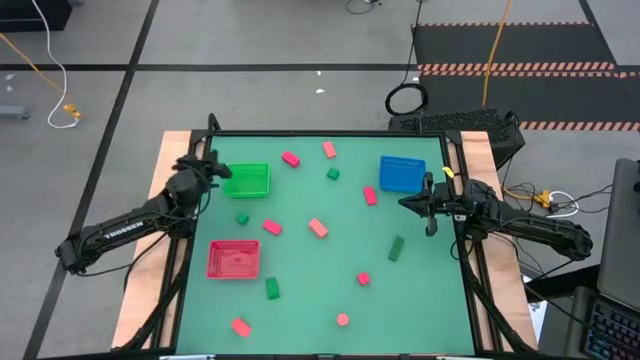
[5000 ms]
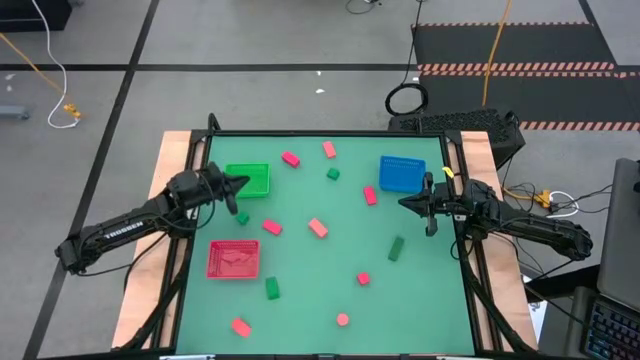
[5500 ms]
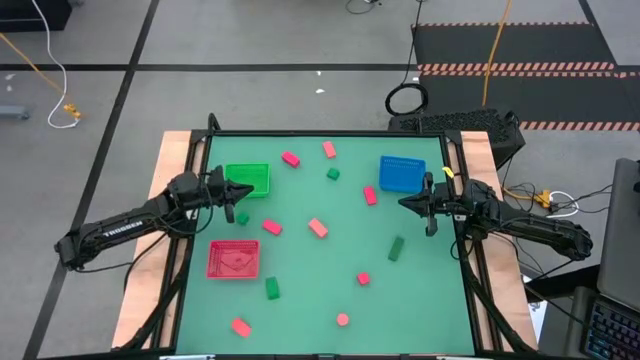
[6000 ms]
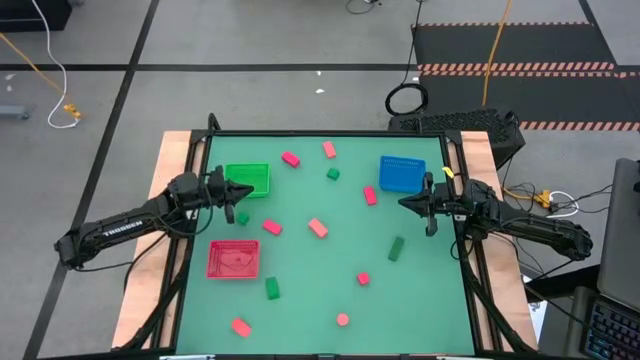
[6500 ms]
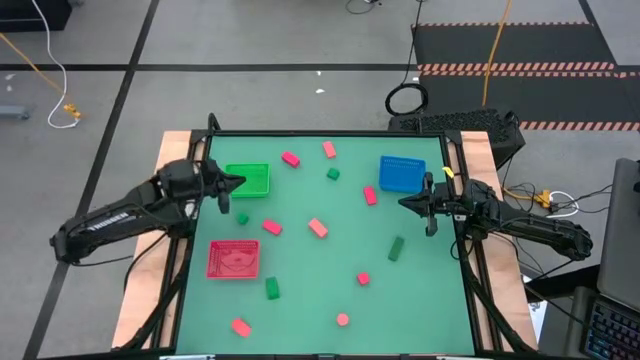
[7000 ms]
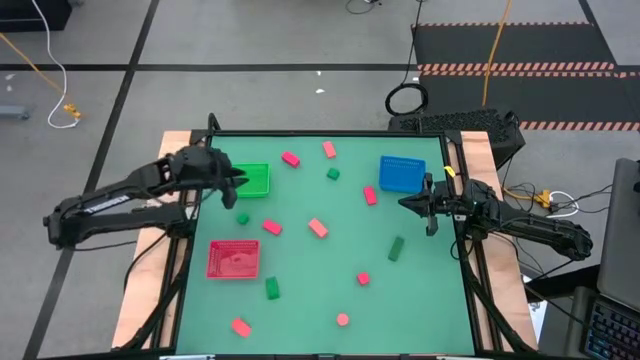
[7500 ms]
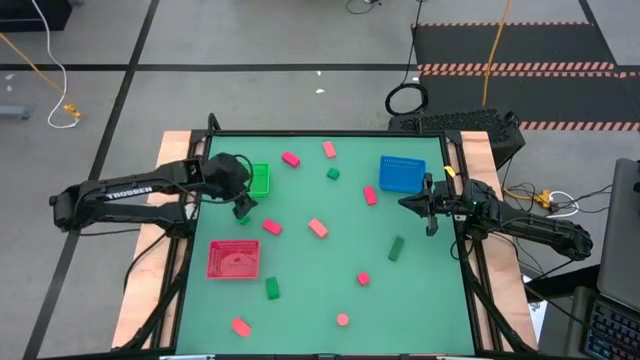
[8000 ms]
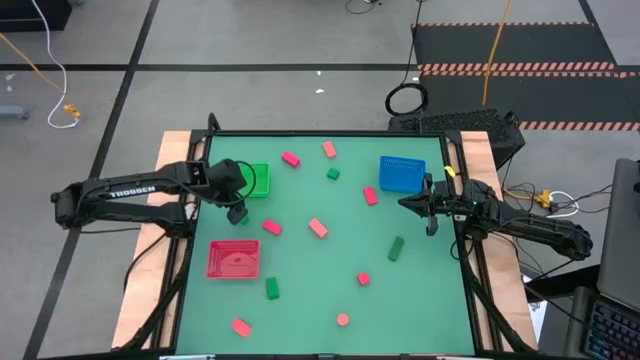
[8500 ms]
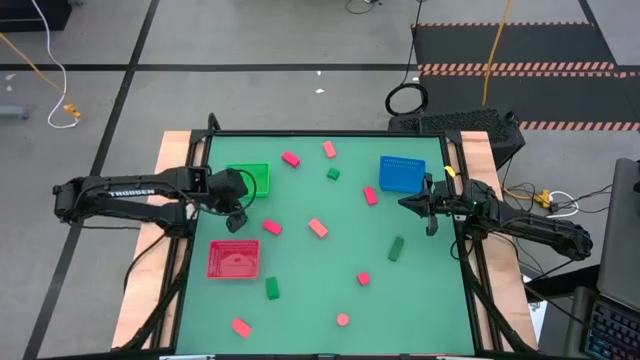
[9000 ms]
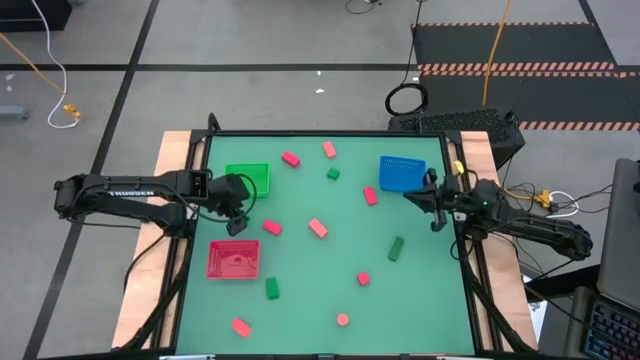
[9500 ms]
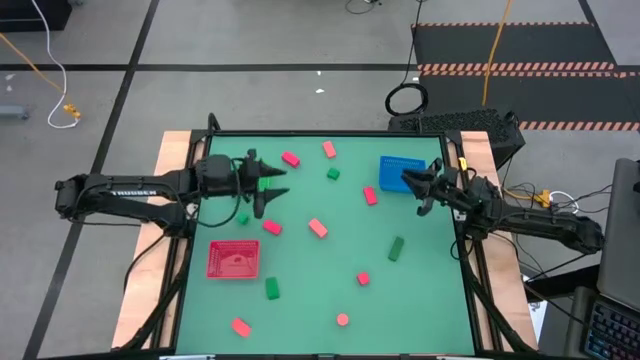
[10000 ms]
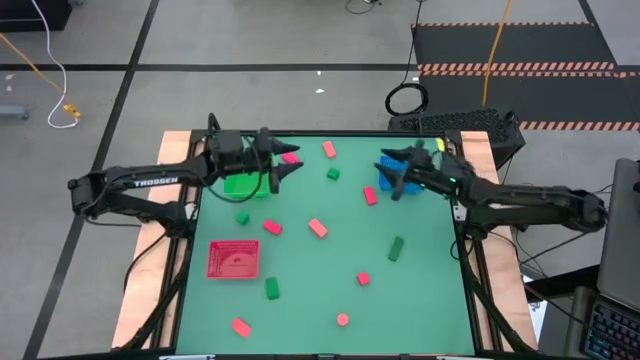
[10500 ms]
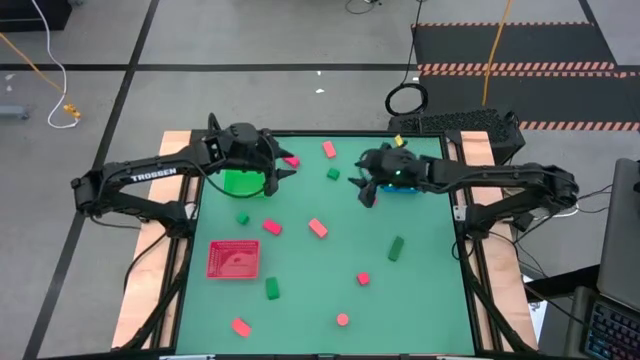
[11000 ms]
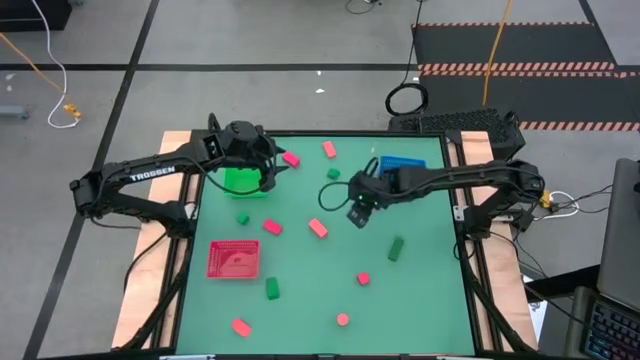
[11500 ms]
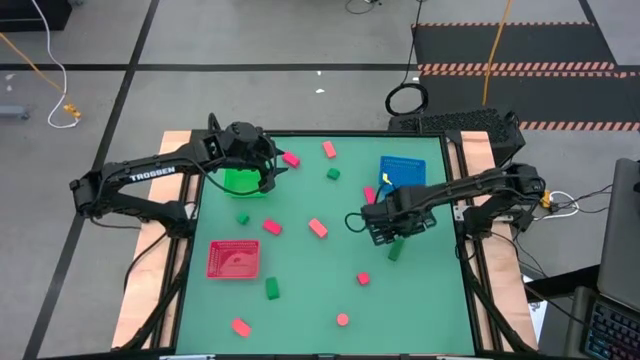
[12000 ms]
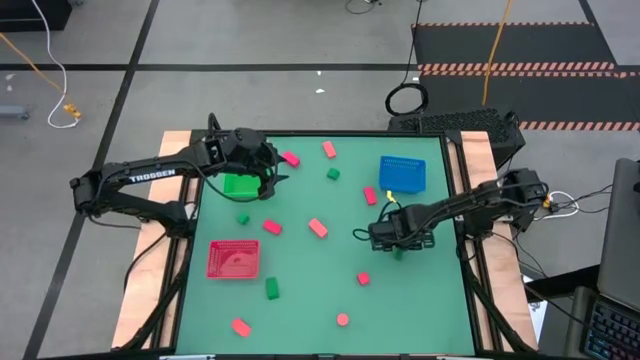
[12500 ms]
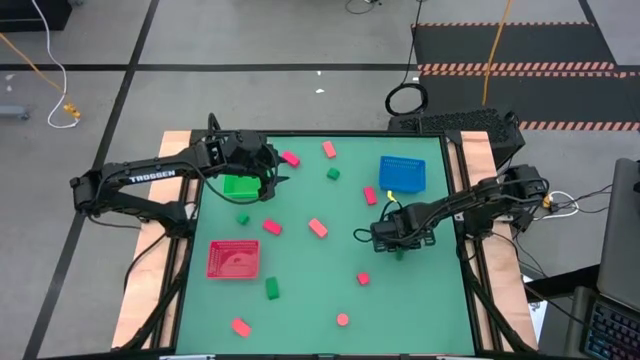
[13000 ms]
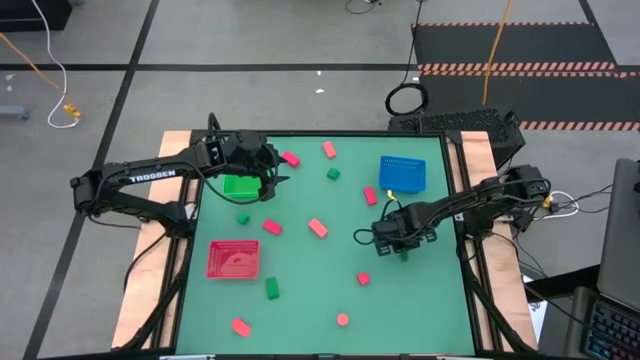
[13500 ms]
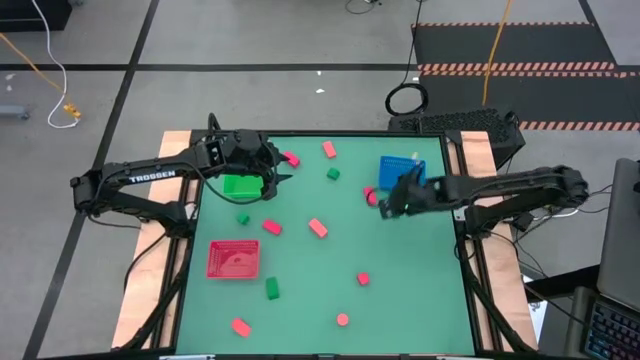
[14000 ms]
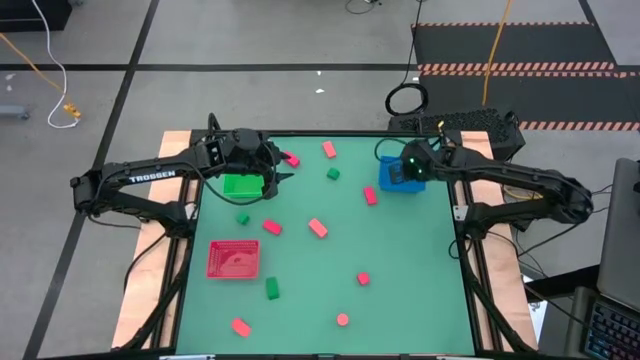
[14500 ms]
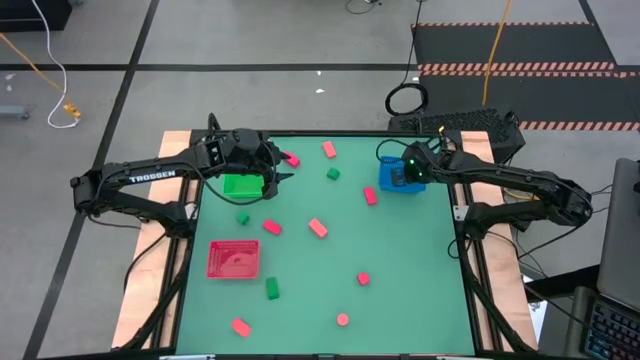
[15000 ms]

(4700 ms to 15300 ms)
Task: Sort & place blocks by color
Put the green block into the blue bin

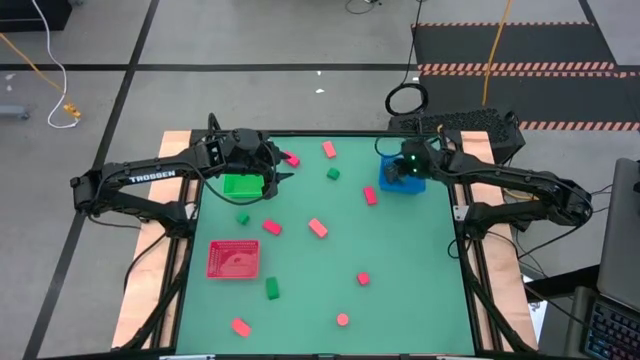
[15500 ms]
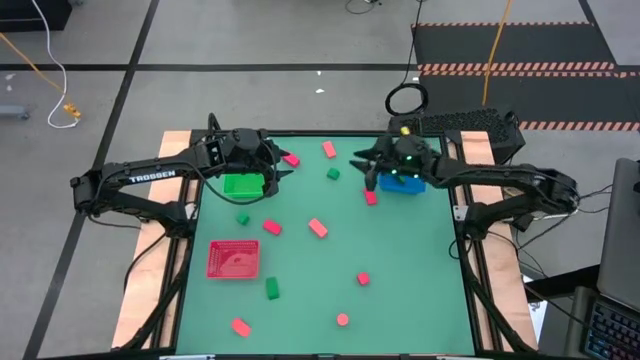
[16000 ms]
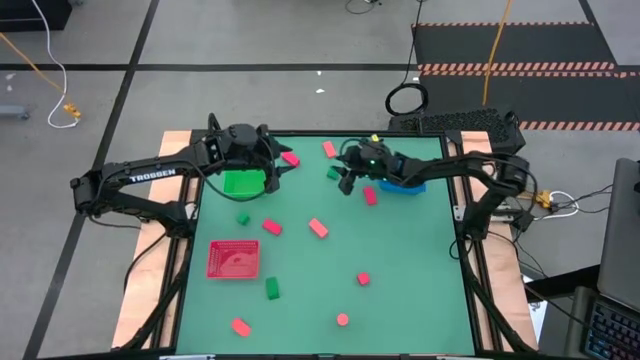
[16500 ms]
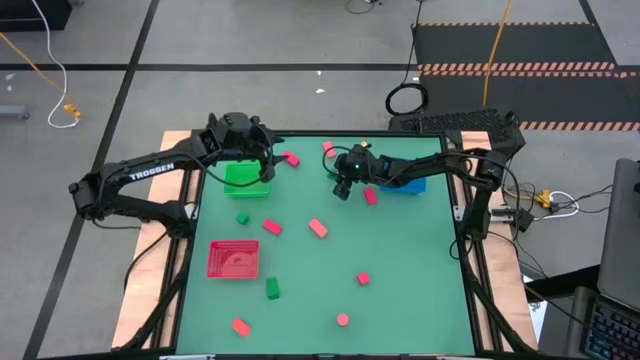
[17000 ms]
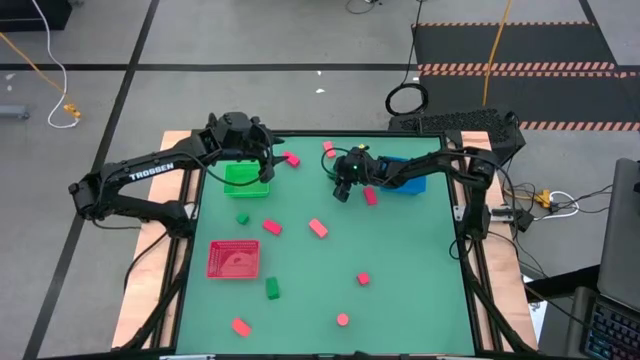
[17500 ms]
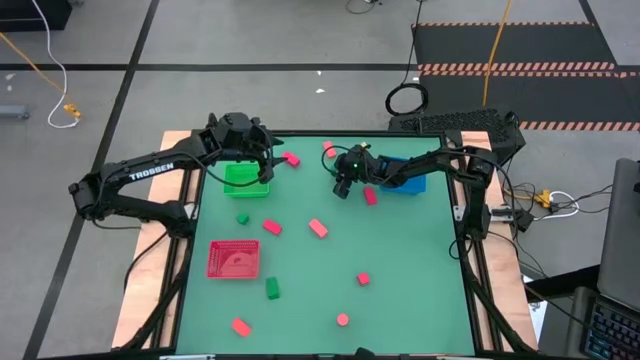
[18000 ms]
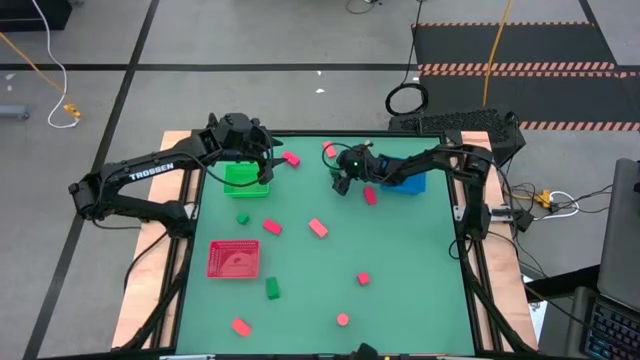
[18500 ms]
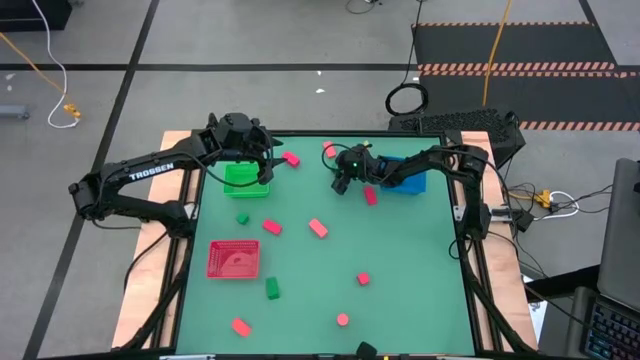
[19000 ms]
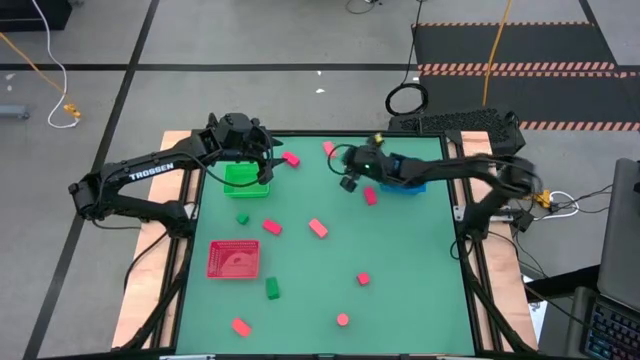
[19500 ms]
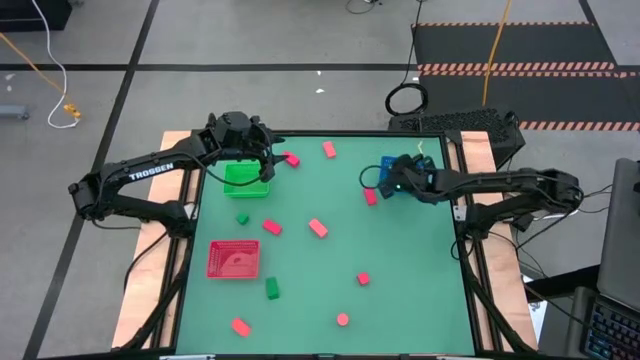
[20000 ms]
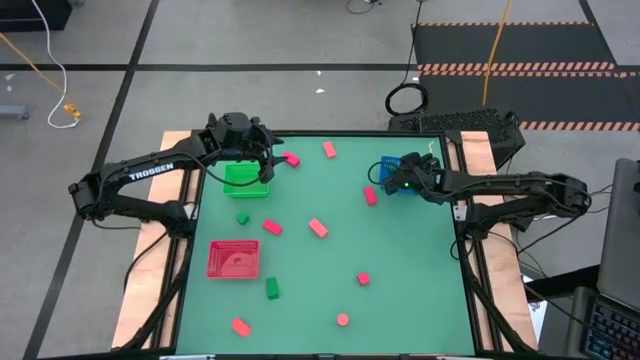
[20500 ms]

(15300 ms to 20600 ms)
Put the green block into the blue bin

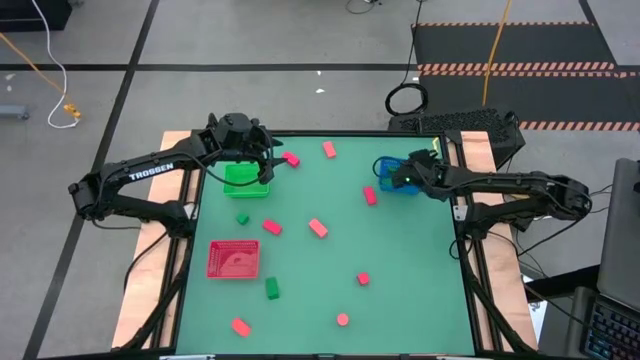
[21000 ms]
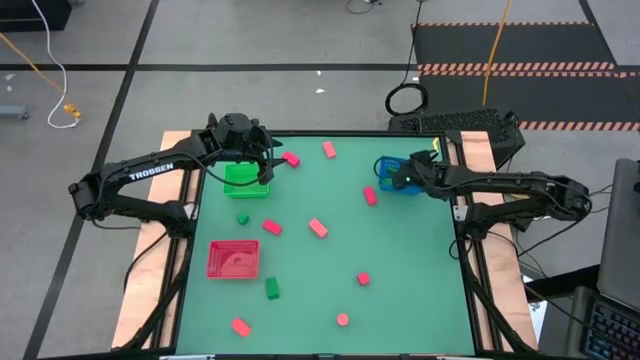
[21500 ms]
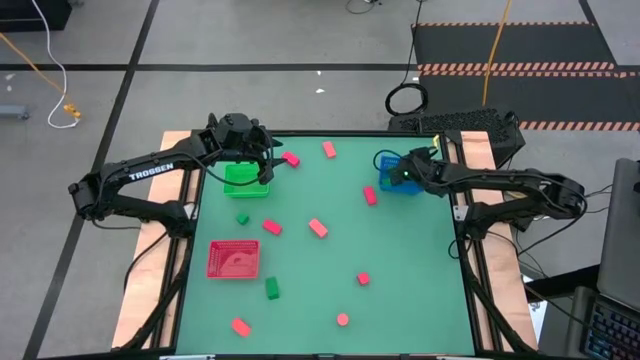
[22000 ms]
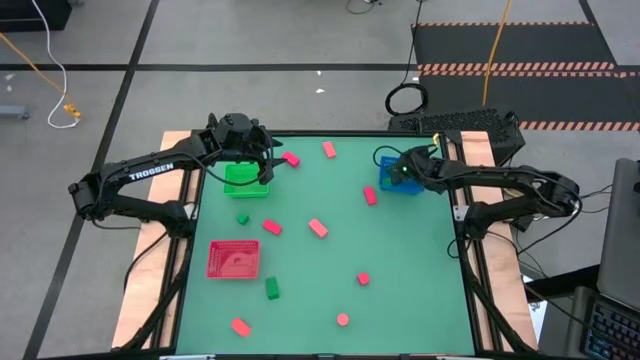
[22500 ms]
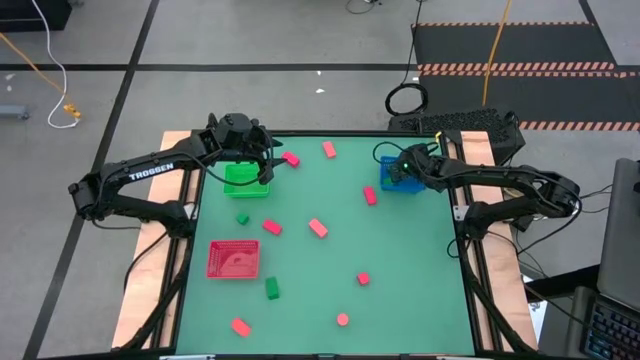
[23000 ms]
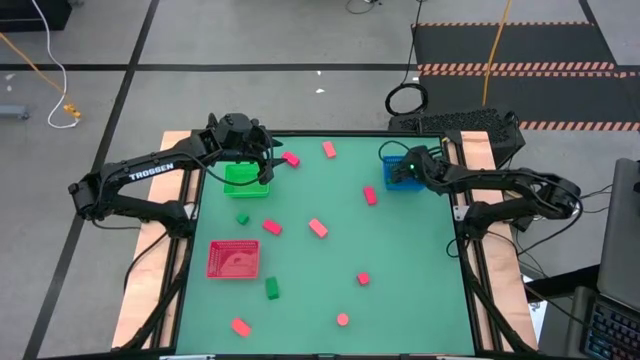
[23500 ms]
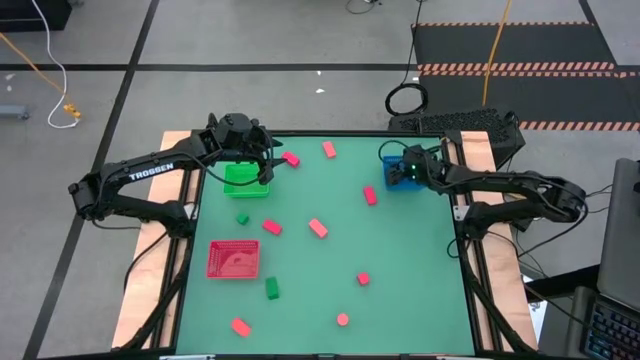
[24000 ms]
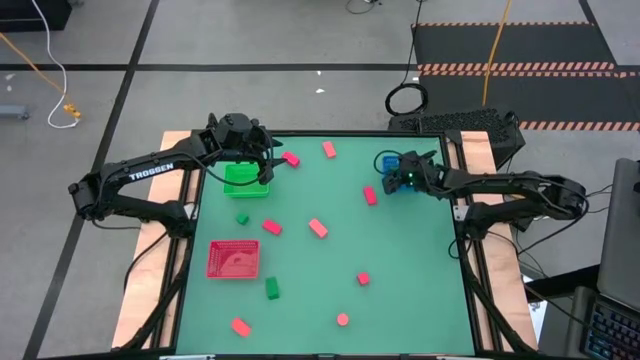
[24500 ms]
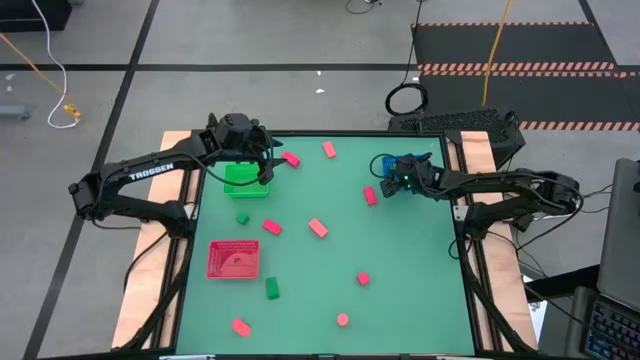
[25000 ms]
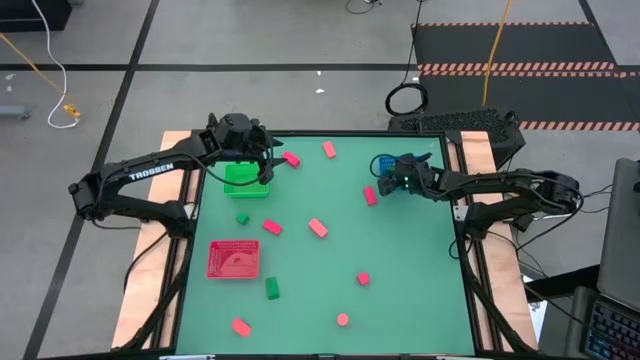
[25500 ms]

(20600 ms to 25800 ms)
Adjust the blue bin
